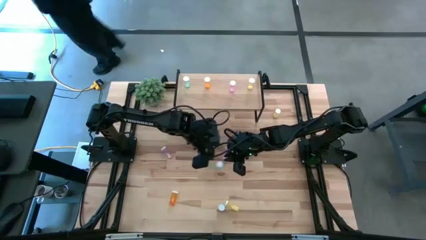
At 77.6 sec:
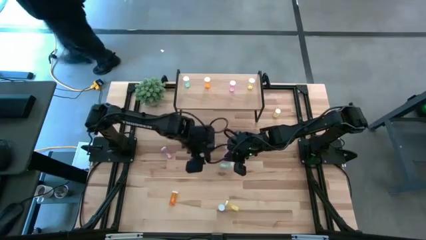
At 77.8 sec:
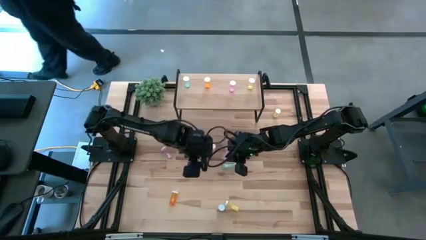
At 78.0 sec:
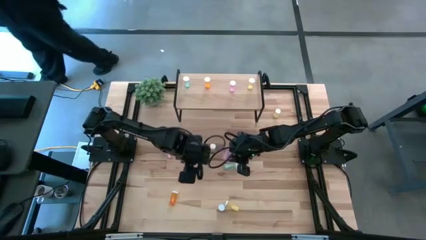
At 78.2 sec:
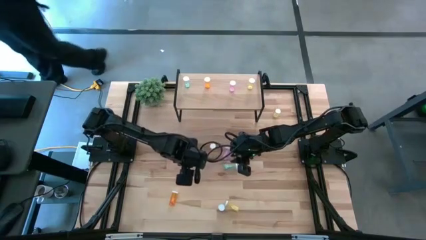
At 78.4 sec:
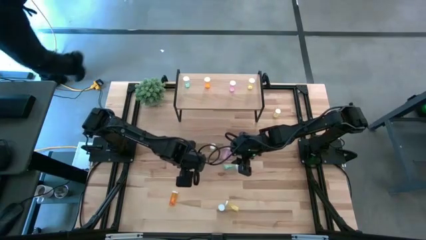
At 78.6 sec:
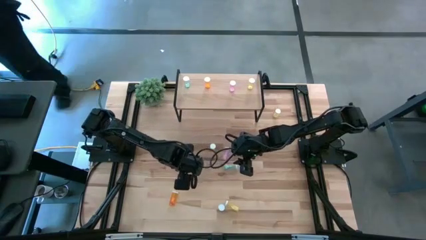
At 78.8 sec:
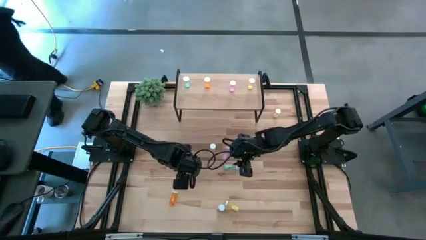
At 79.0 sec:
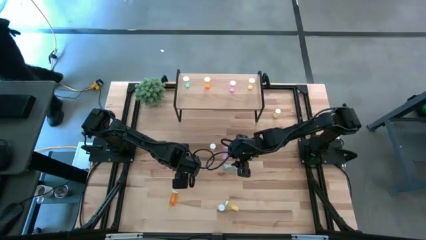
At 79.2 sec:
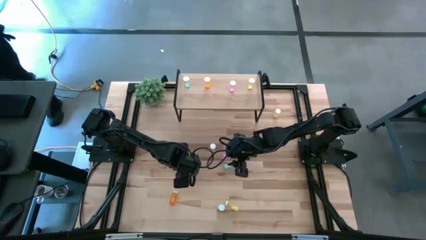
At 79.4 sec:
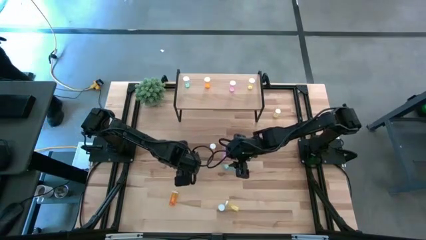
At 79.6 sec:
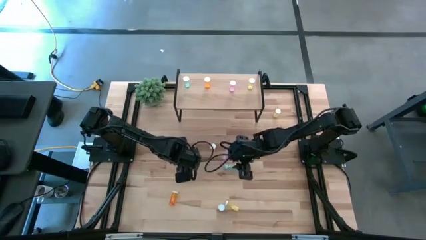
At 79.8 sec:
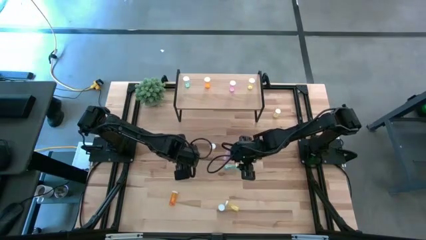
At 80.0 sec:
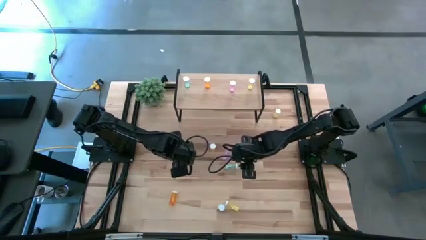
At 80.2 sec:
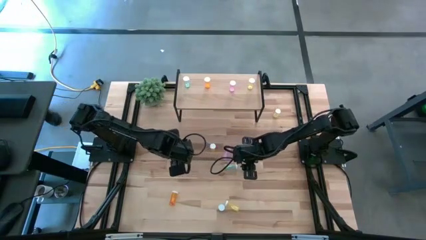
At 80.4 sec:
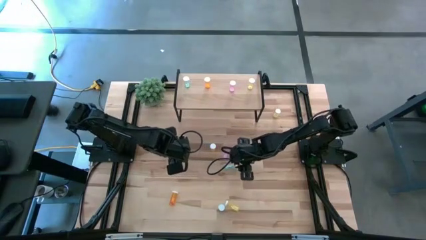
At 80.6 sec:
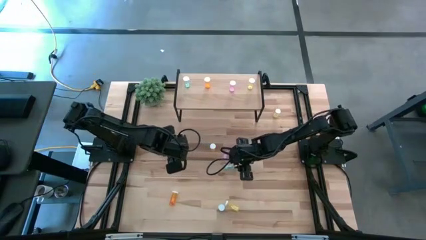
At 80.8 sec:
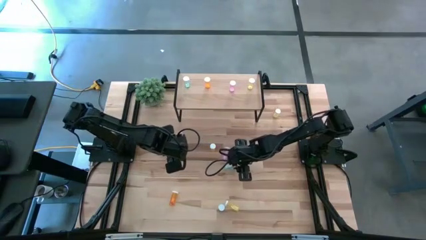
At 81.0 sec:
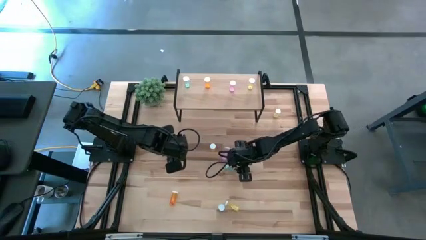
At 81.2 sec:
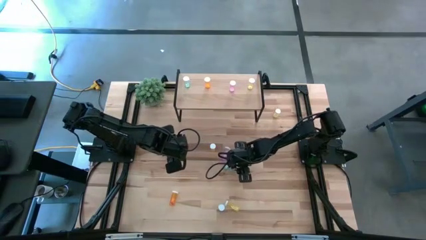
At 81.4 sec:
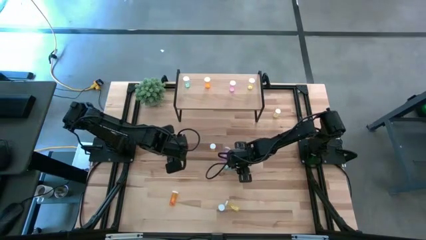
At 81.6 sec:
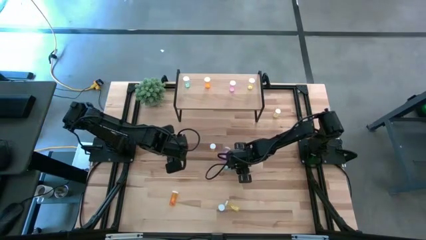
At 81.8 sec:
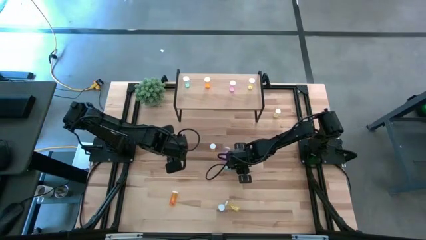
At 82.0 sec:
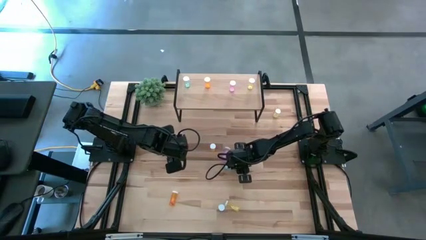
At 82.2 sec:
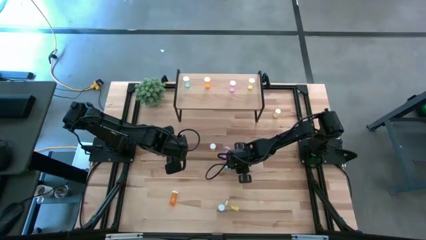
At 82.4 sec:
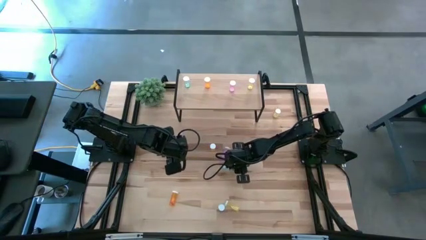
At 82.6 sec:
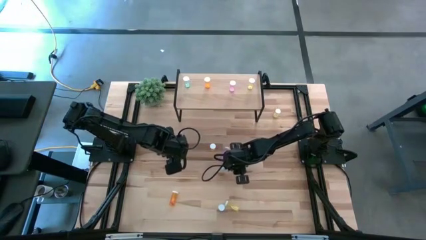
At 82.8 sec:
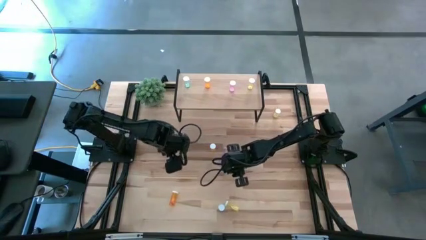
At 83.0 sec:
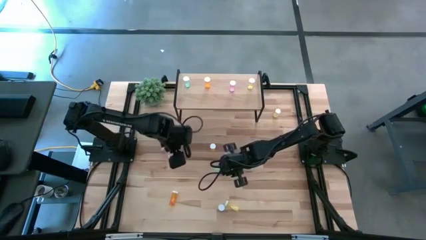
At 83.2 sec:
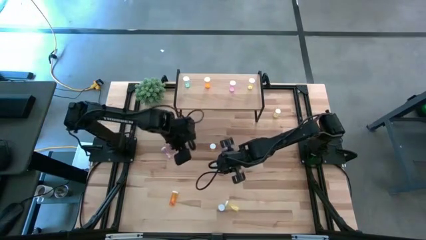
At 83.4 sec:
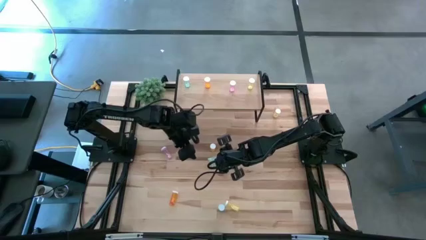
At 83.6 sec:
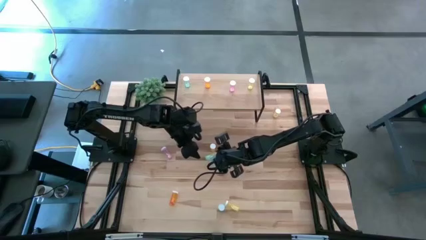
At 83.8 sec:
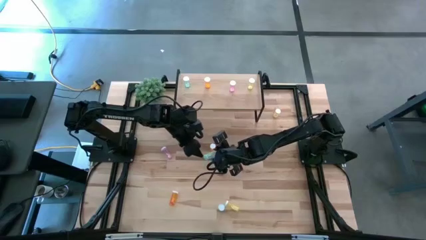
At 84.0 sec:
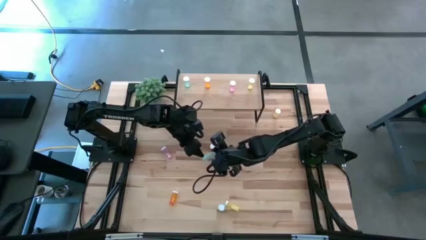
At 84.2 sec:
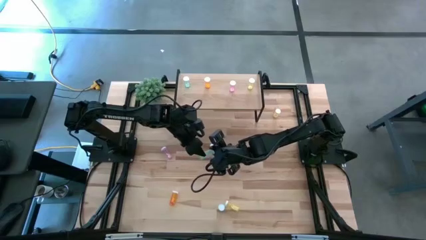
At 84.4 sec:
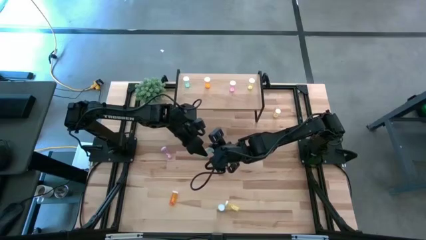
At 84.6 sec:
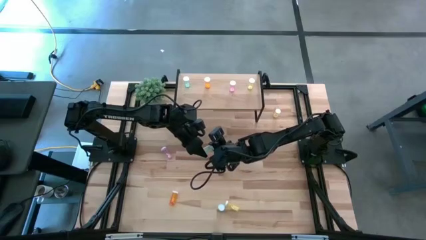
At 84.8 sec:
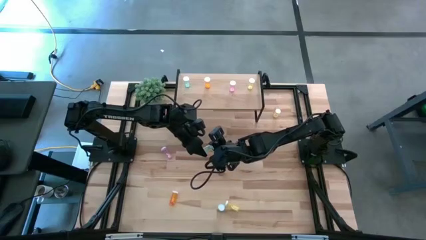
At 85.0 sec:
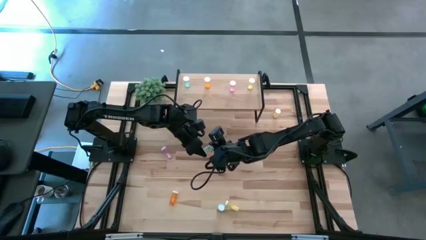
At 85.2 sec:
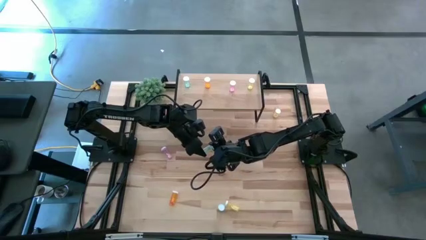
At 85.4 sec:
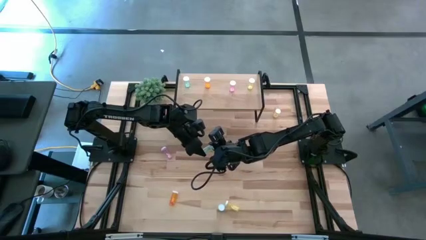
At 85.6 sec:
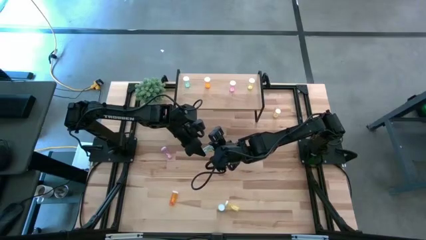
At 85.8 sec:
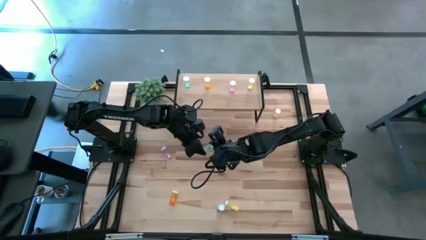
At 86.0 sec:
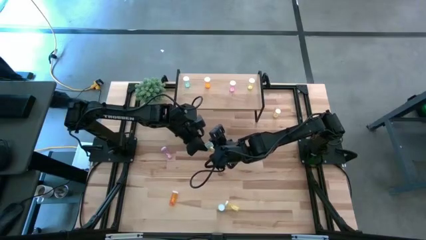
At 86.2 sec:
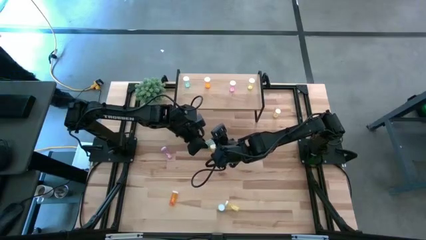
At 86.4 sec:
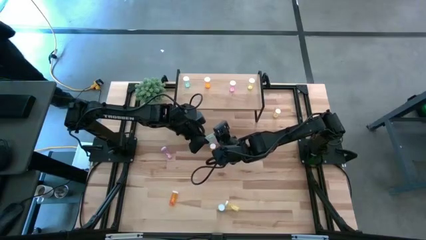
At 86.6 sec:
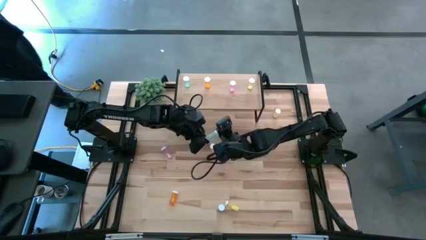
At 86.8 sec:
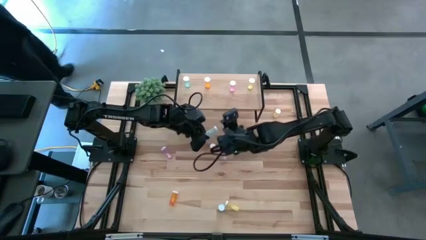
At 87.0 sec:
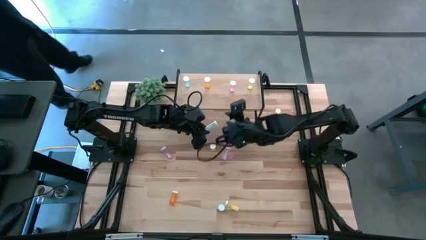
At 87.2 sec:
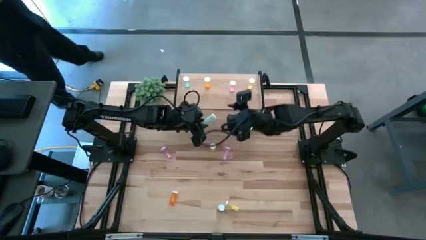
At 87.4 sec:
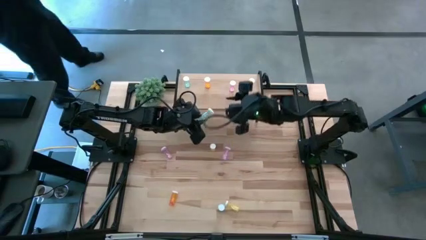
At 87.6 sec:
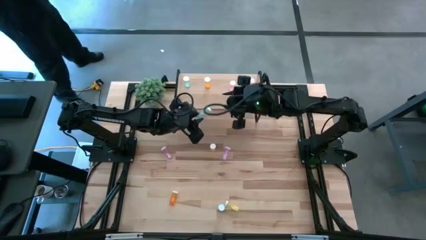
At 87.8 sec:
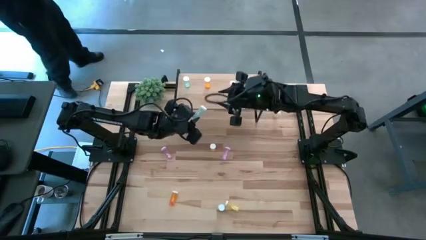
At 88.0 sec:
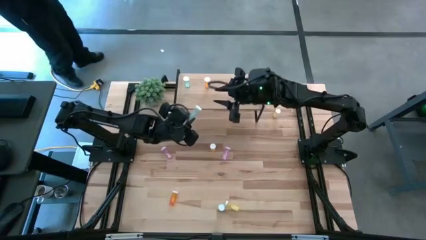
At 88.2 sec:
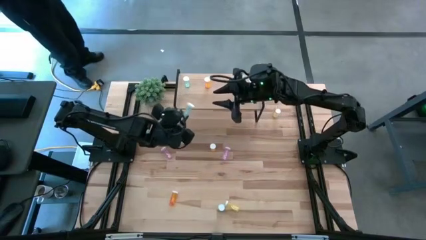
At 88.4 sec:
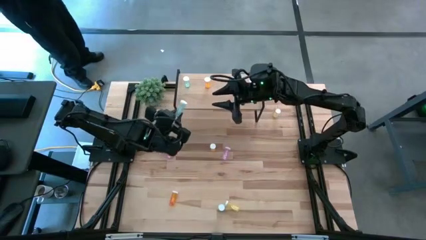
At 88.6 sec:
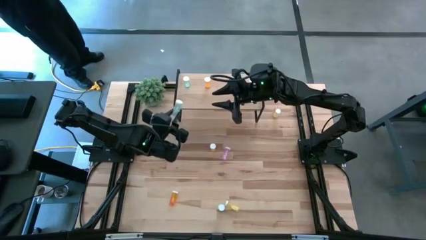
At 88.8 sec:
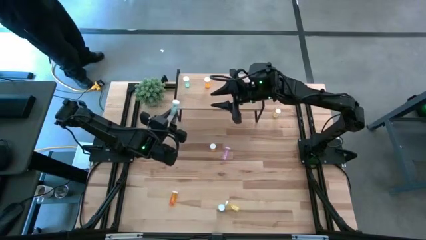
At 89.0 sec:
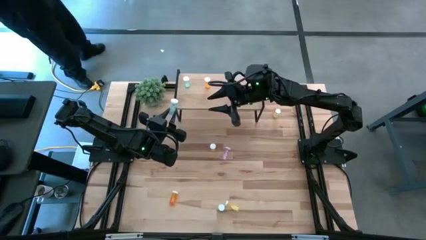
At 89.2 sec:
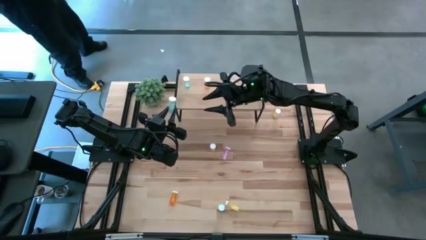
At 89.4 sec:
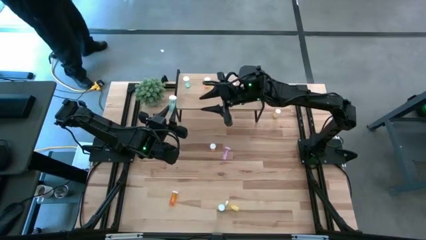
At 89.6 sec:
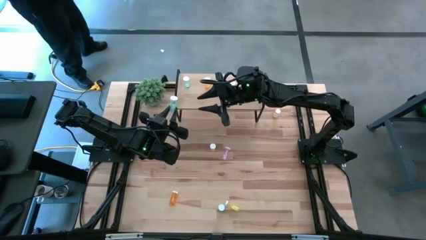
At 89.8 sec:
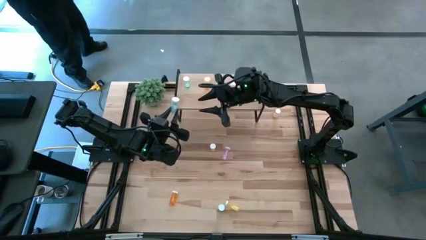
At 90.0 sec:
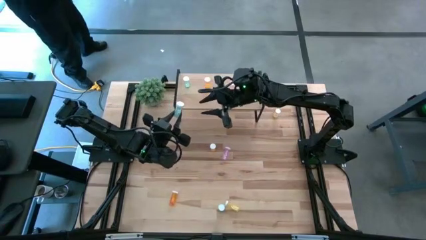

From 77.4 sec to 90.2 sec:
Task: Pick and place medicine bottles onto shelf by color
Put the top blue pill bottle on the shelf aligned with the blue pill bottle

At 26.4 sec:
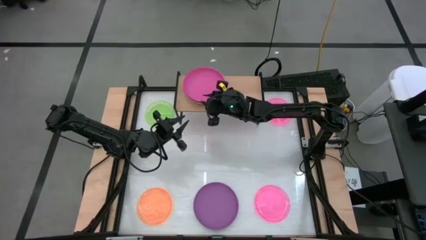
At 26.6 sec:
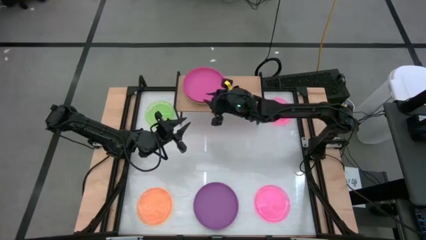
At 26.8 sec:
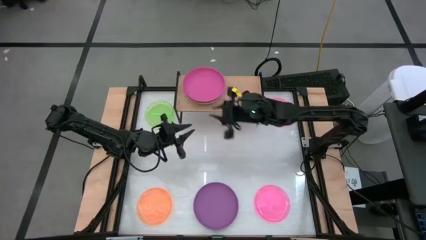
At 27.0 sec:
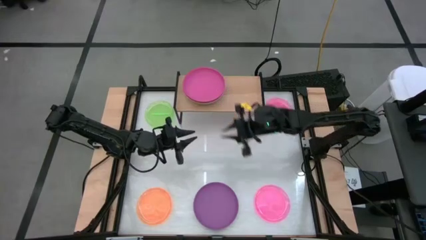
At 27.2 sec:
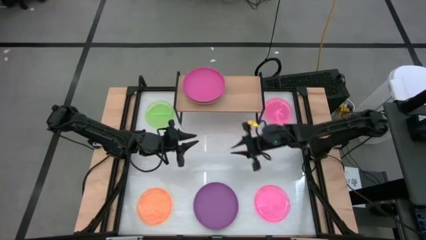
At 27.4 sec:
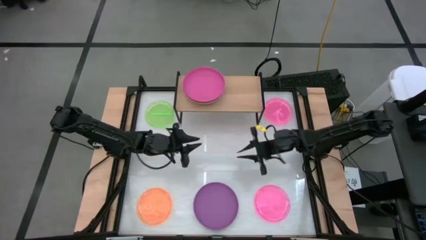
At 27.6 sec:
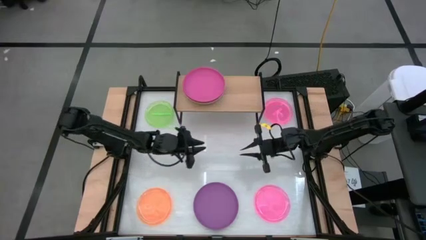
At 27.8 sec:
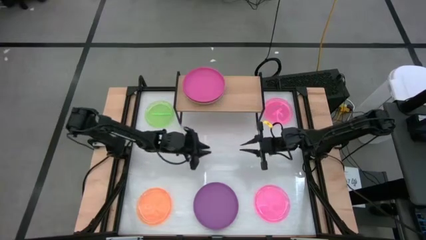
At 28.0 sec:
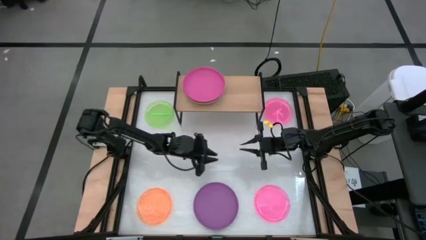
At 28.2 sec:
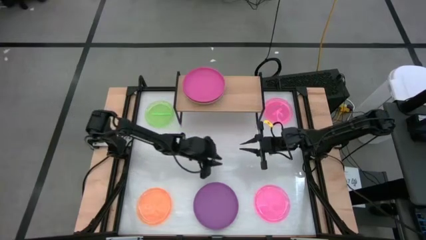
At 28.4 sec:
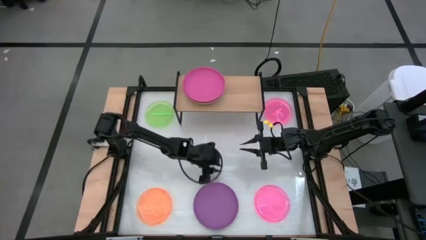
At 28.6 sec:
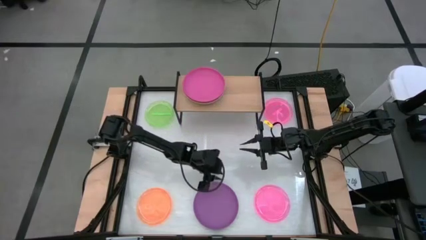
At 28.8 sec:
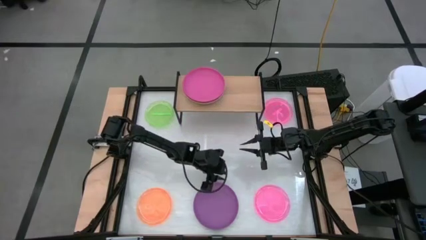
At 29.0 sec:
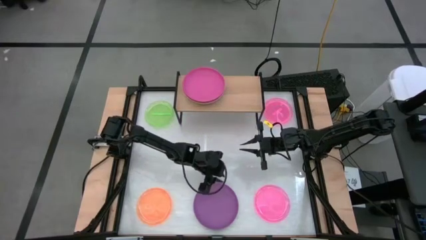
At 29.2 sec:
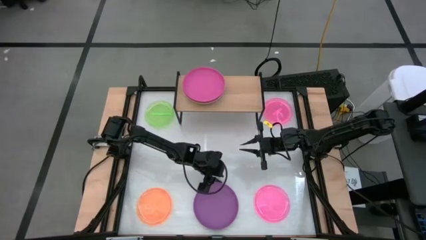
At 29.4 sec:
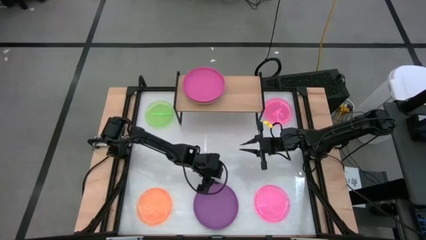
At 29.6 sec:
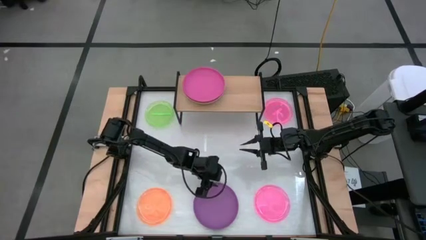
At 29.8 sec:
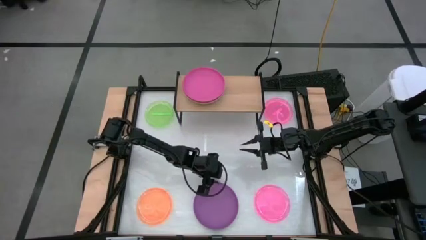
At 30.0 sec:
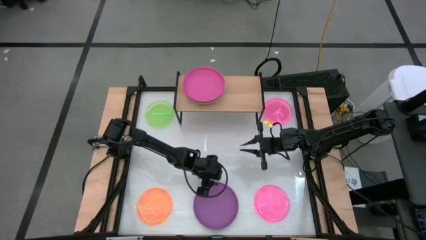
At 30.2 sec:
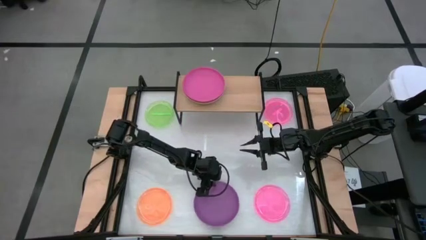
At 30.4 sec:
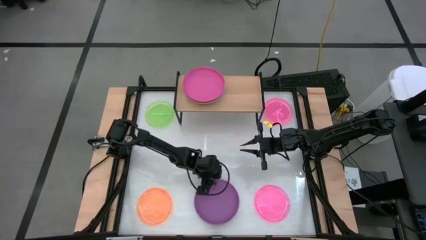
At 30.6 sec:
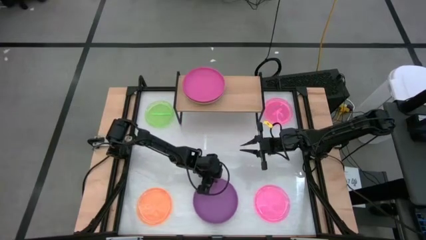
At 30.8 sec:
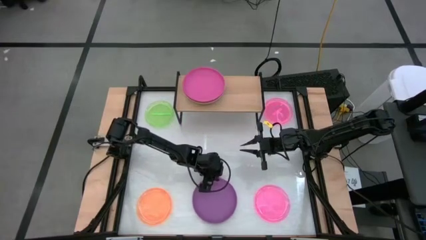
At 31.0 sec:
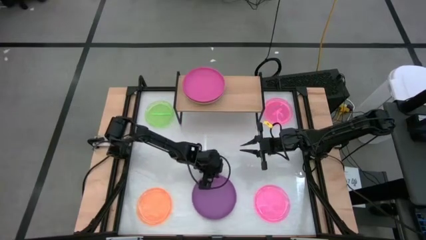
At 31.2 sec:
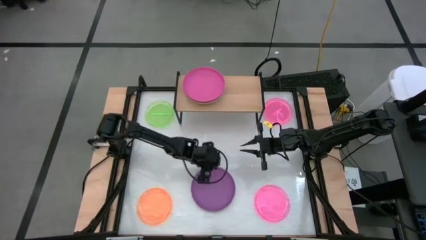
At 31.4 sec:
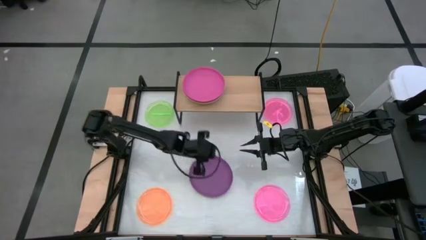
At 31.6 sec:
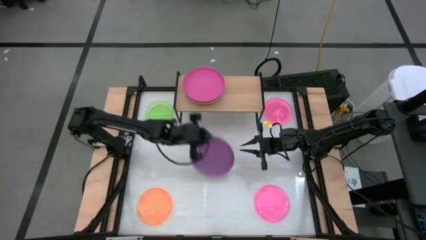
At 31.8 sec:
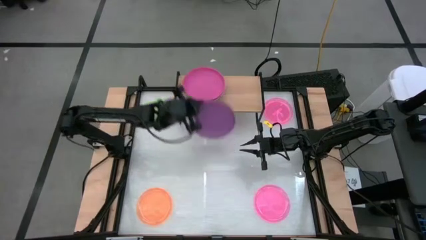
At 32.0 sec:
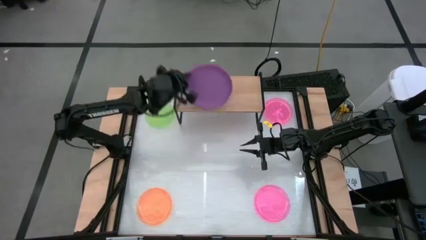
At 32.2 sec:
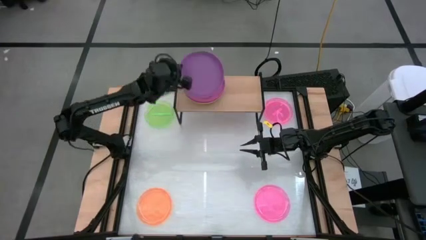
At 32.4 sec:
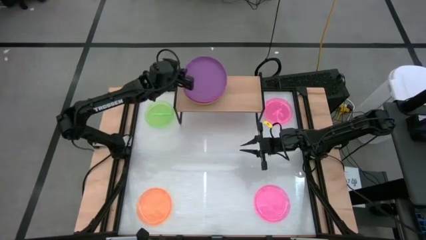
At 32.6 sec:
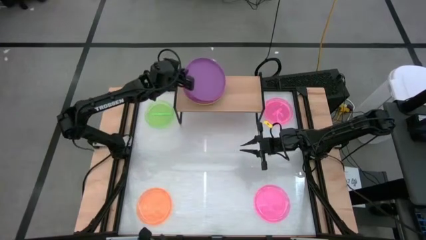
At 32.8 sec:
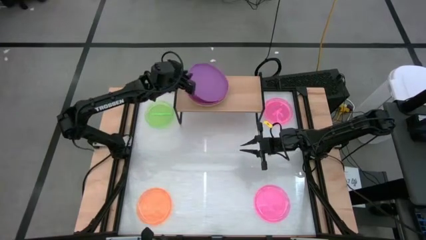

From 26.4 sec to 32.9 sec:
Task: Place and stack plates onto a shelf
Stack the purple plate on top of the pink plate on the shelf
